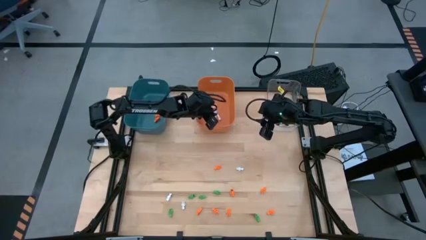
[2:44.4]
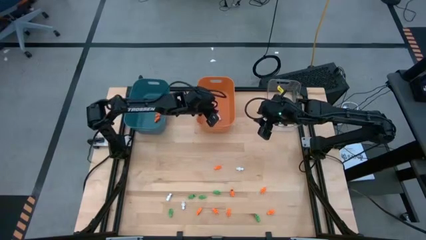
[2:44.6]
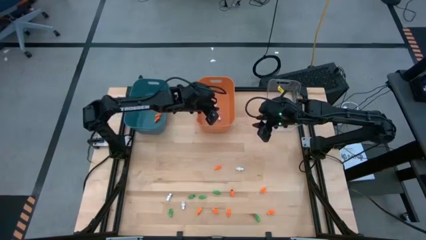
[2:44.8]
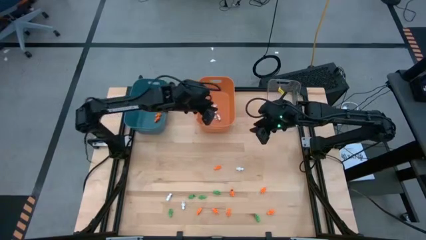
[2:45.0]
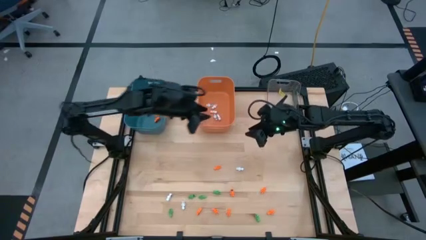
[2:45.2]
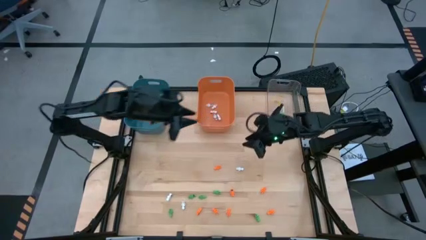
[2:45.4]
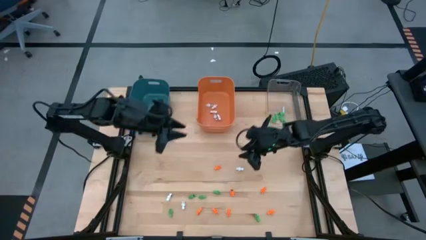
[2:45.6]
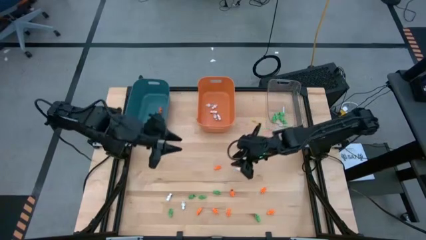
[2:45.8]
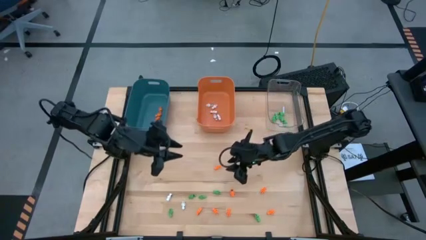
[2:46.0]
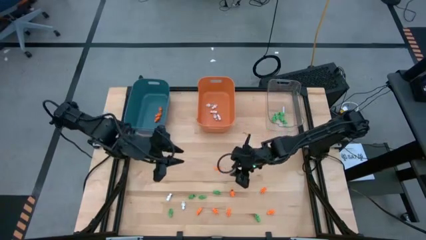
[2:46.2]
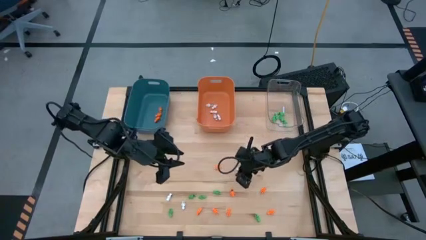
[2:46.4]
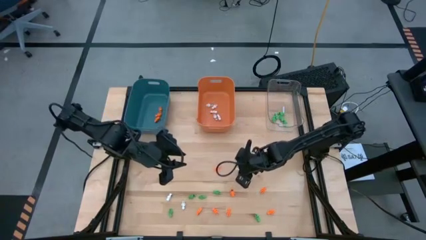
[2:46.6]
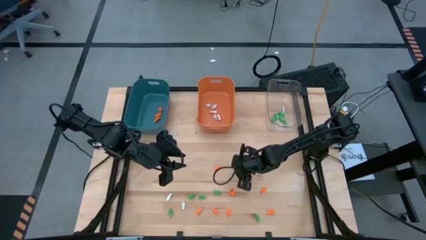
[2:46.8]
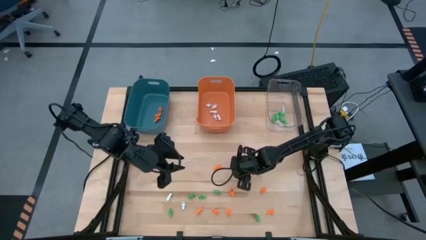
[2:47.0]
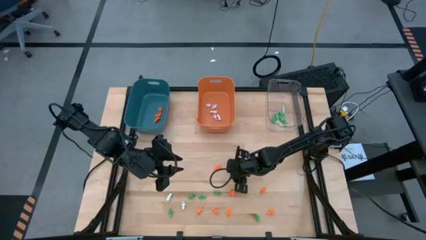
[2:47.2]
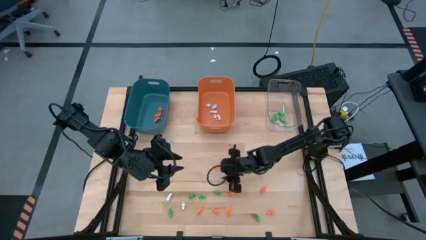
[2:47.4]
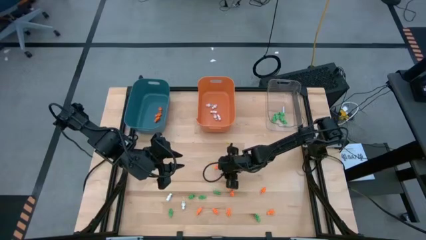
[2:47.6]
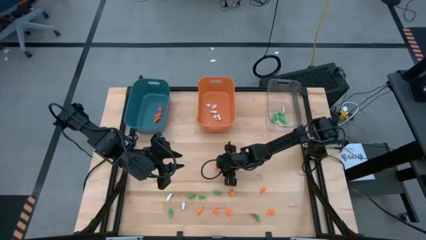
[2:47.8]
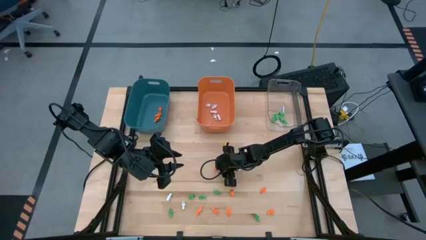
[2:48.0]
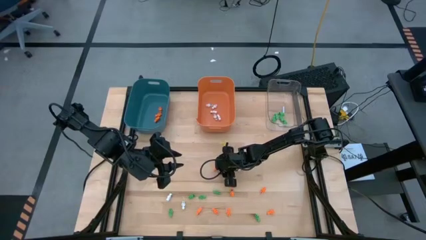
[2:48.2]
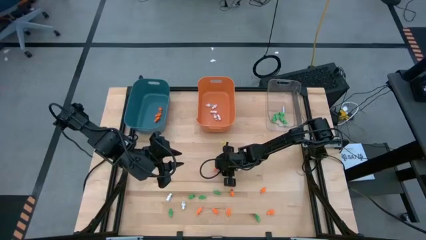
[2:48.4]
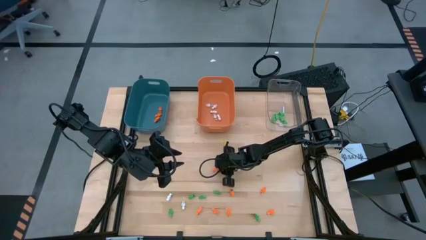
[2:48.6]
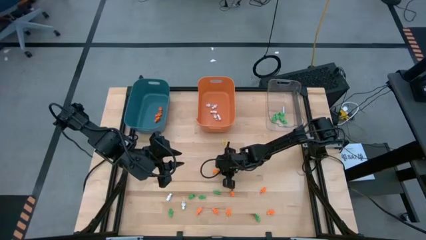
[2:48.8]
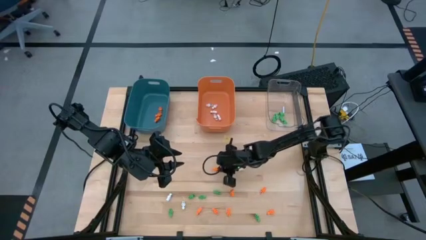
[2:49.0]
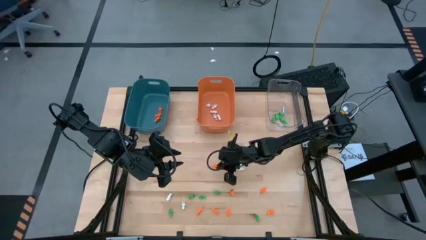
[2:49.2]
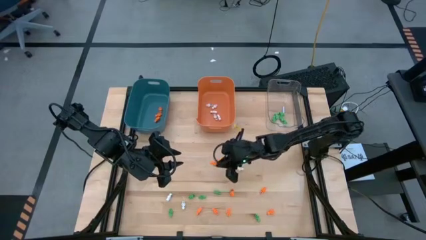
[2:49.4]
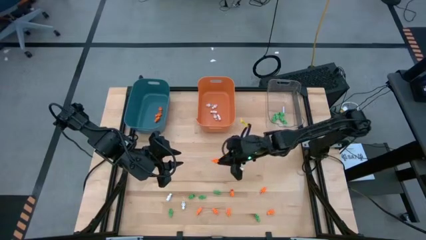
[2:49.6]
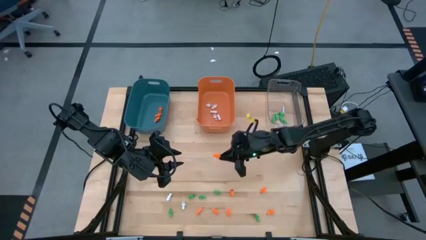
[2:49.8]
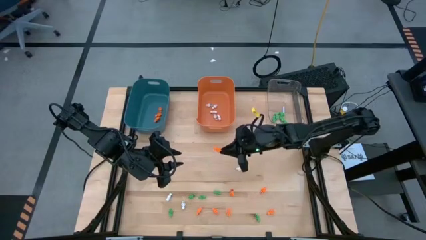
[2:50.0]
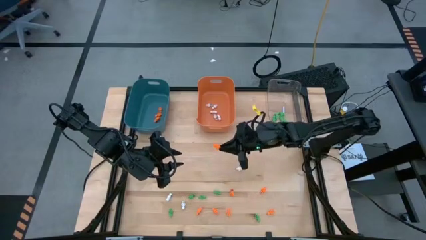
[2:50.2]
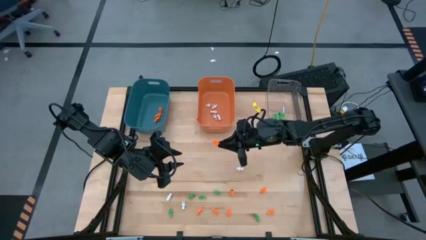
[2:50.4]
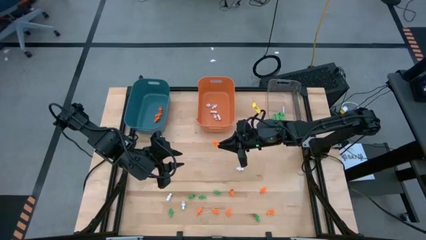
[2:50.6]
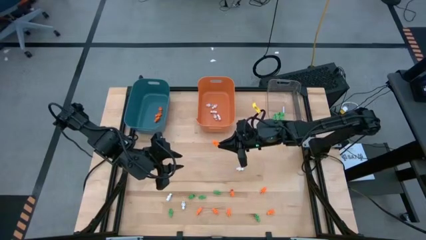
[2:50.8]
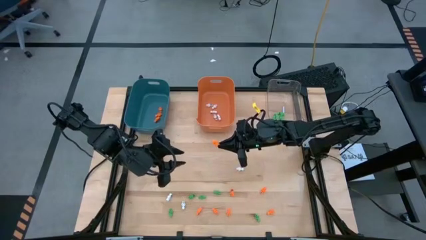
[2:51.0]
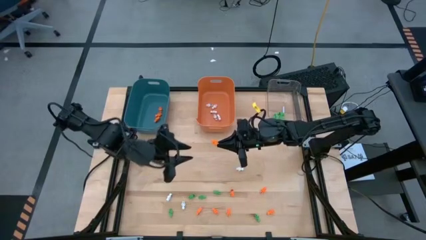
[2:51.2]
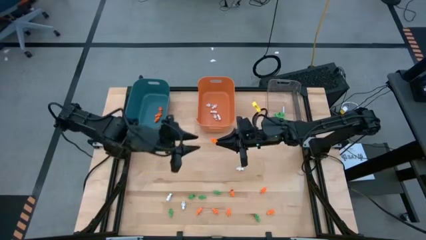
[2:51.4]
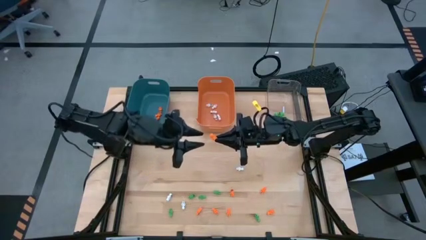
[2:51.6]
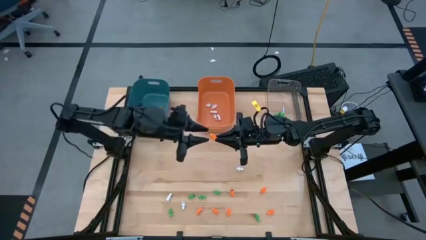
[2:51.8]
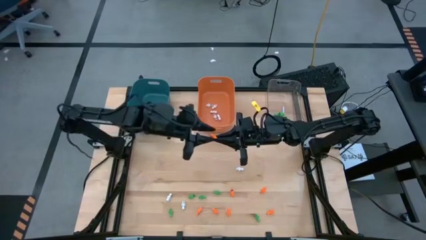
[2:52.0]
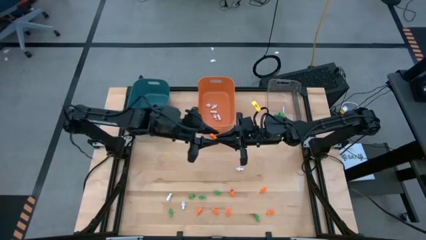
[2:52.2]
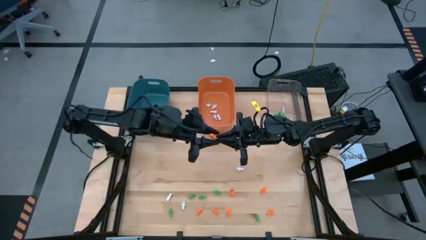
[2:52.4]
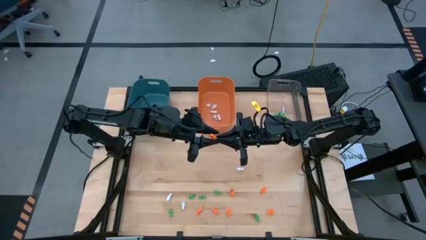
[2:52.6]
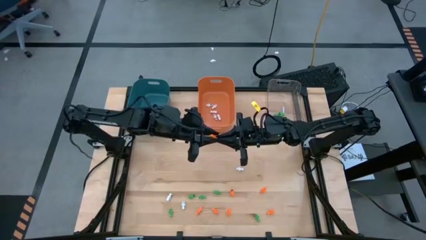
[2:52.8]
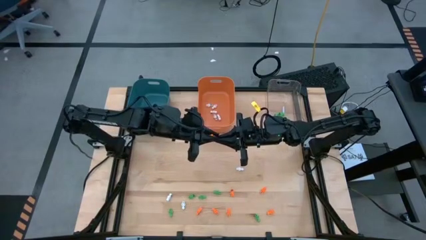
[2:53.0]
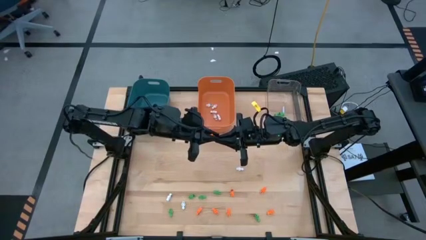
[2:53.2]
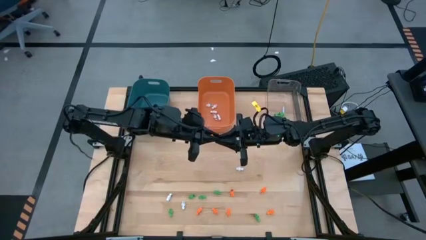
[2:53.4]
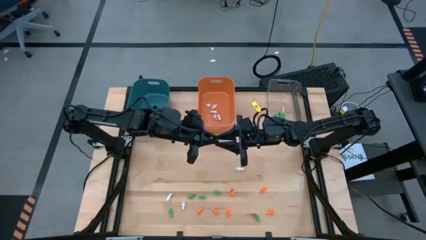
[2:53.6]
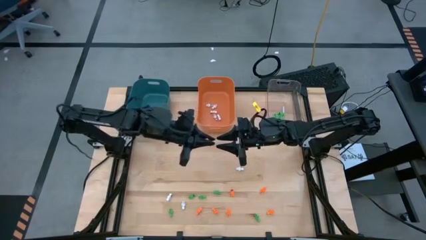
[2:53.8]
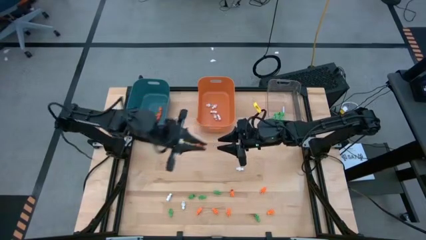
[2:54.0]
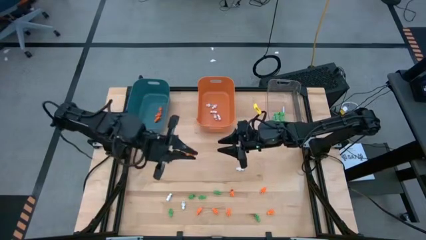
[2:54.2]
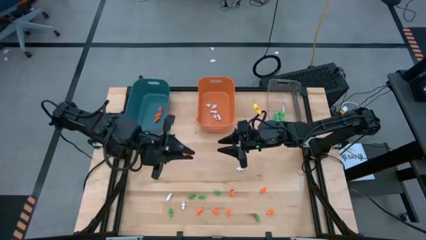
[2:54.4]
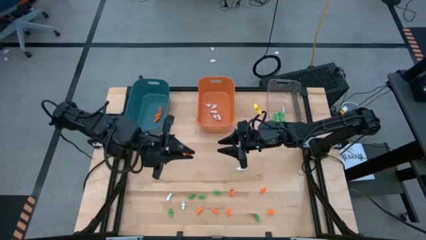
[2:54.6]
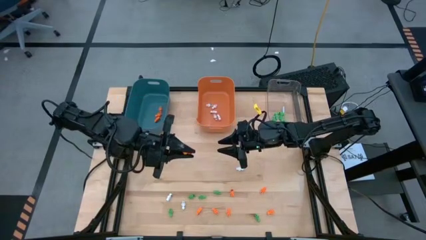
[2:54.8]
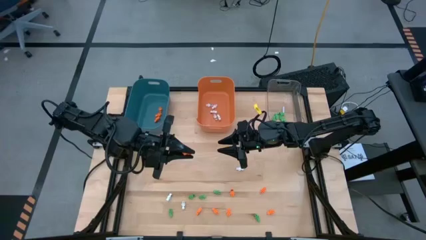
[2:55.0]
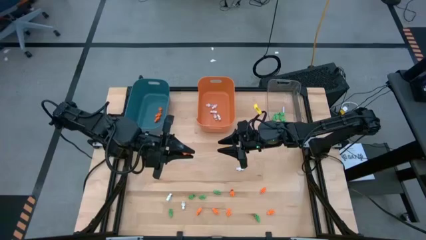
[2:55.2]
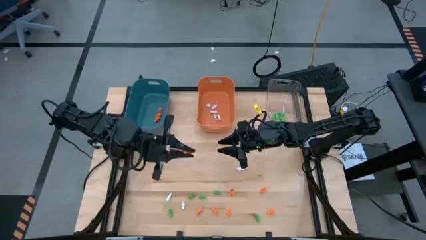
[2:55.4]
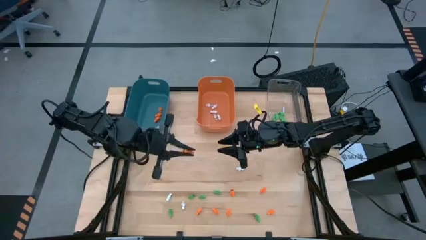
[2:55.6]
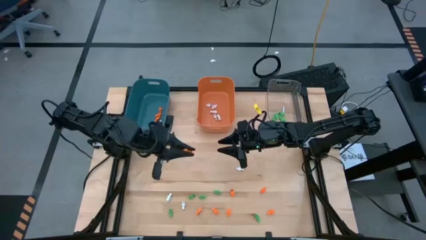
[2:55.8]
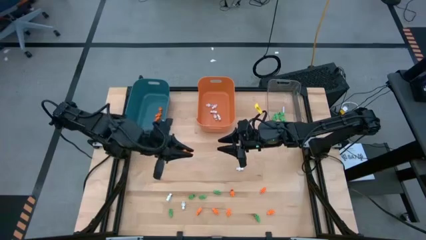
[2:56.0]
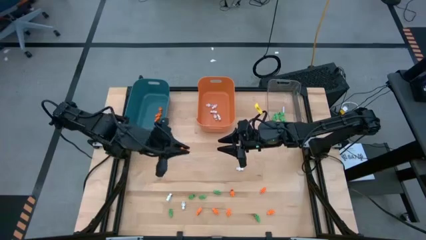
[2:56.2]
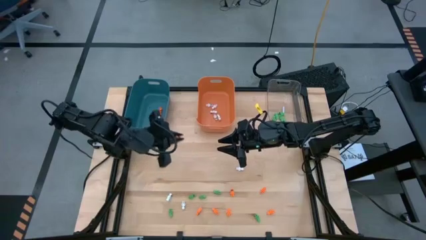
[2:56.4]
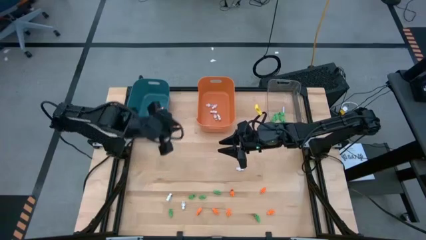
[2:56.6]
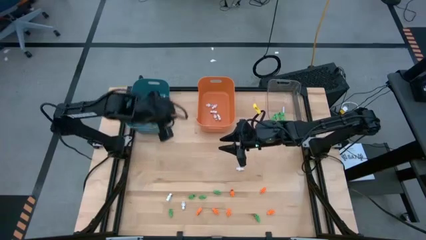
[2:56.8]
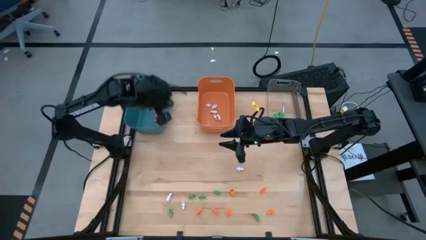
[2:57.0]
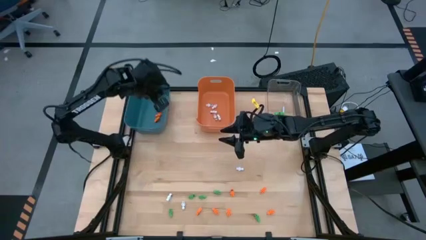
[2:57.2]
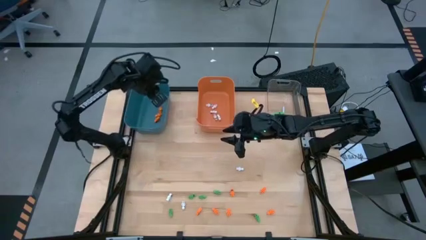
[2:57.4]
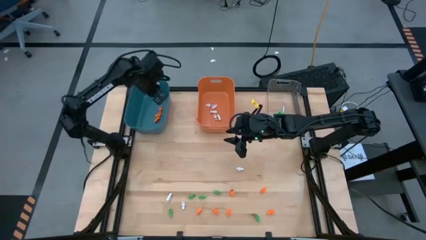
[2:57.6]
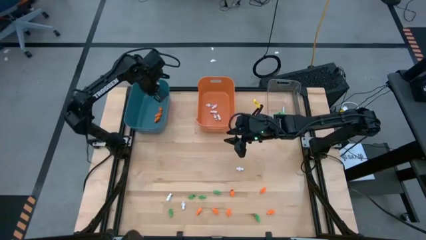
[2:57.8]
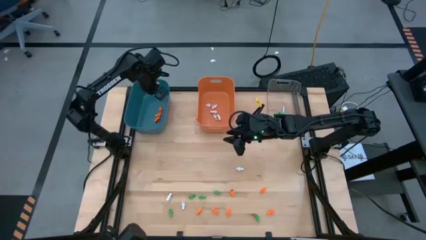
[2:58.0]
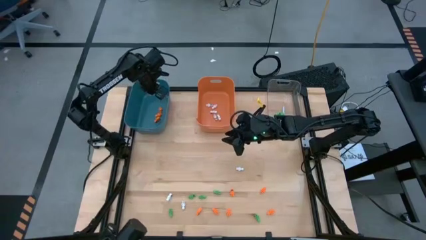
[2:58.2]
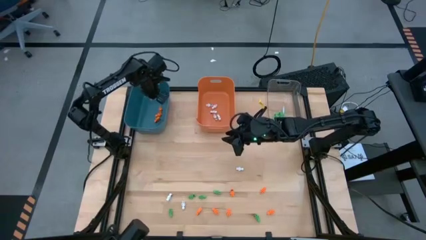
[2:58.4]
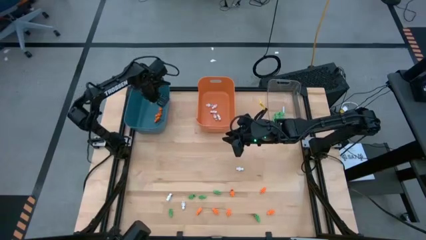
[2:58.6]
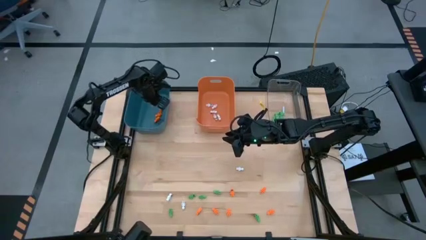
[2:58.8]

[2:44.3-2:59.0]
Task: Sort Halloween decoration
Put the orange skeleton toy into the blue bin
